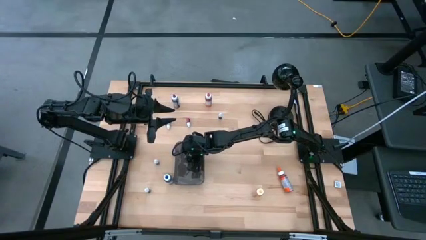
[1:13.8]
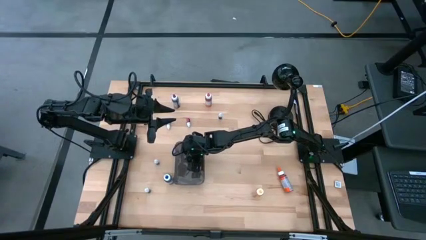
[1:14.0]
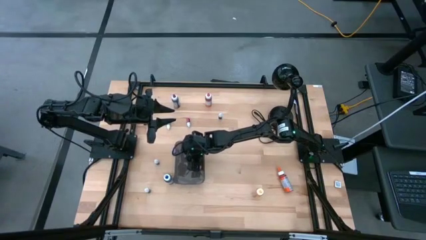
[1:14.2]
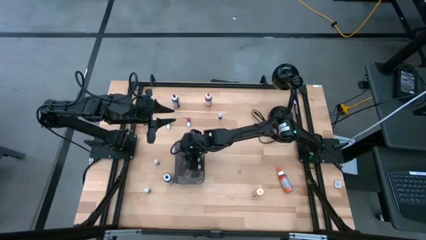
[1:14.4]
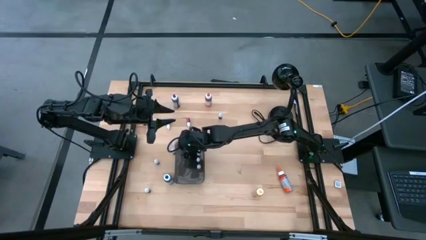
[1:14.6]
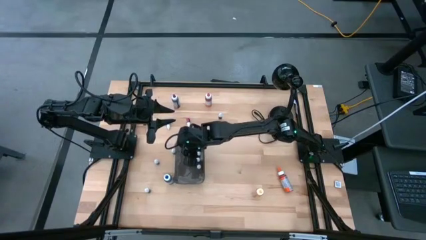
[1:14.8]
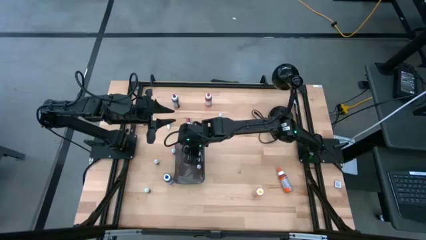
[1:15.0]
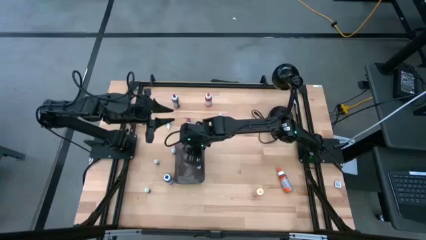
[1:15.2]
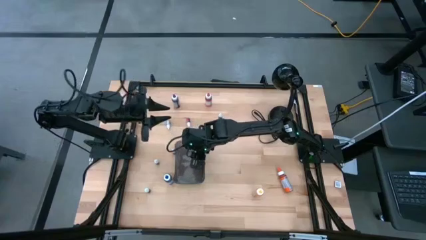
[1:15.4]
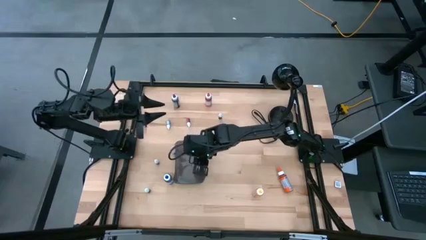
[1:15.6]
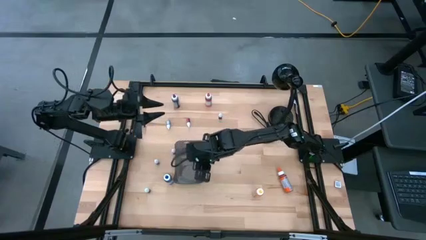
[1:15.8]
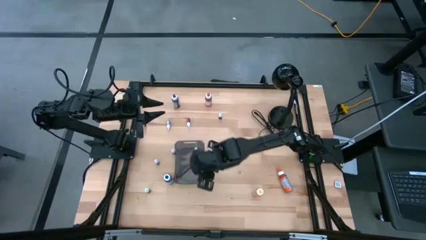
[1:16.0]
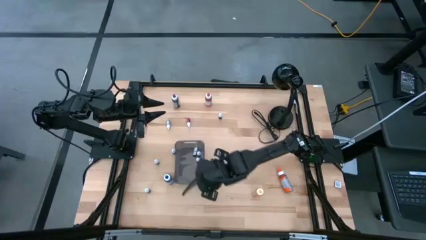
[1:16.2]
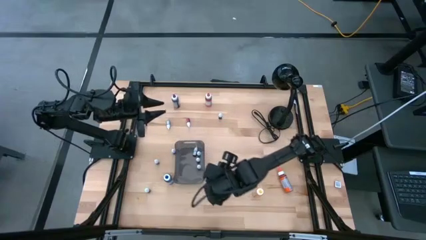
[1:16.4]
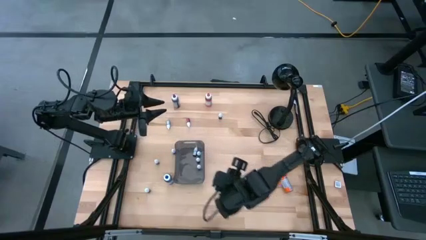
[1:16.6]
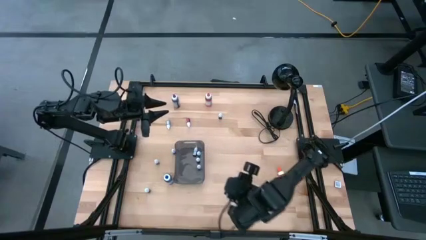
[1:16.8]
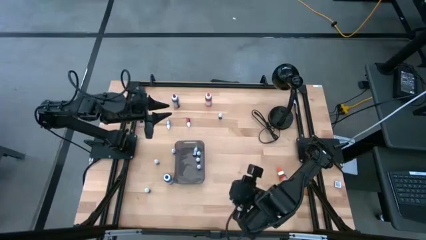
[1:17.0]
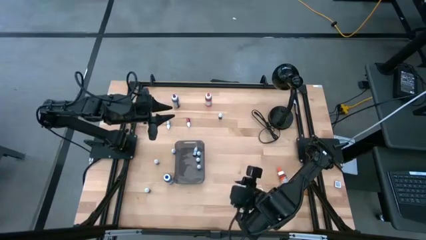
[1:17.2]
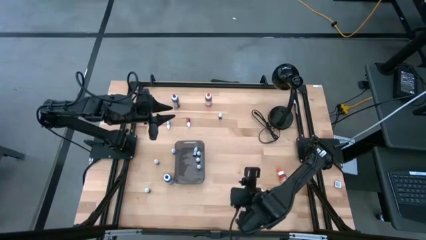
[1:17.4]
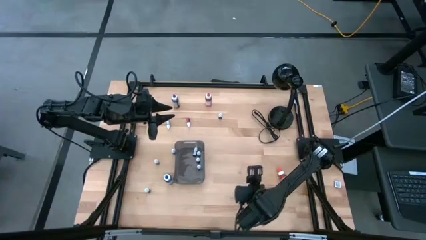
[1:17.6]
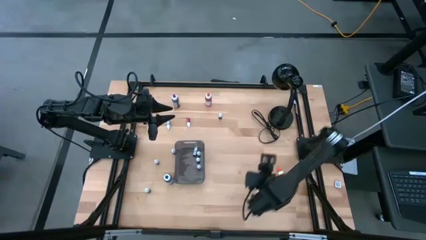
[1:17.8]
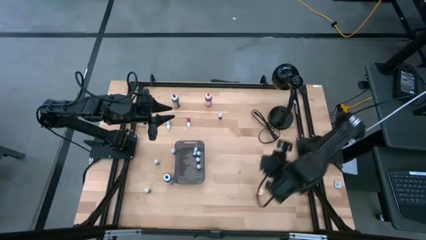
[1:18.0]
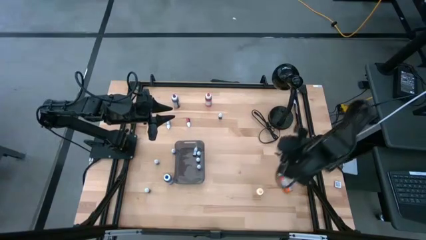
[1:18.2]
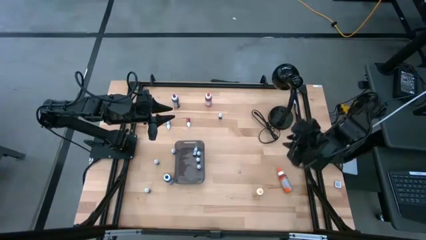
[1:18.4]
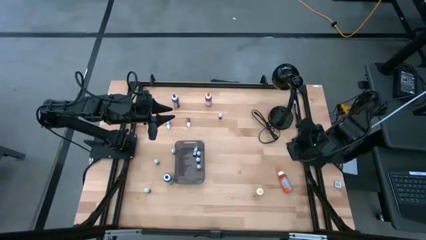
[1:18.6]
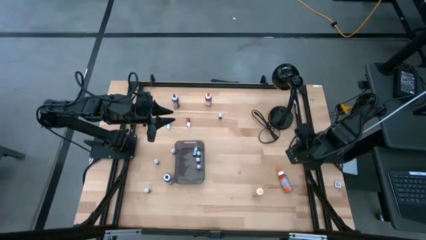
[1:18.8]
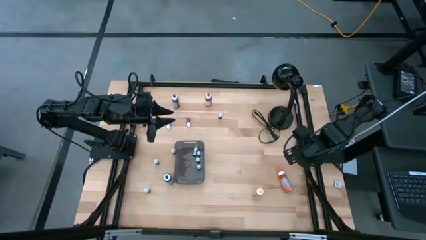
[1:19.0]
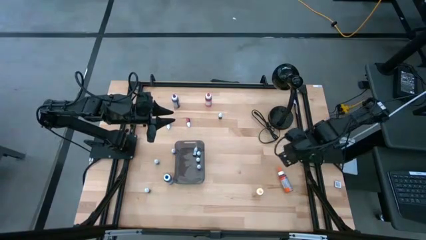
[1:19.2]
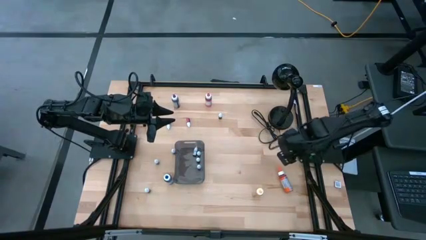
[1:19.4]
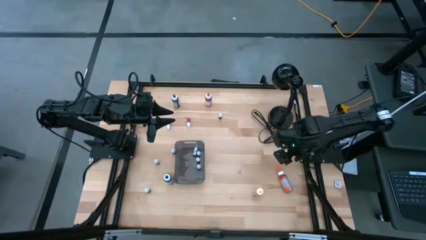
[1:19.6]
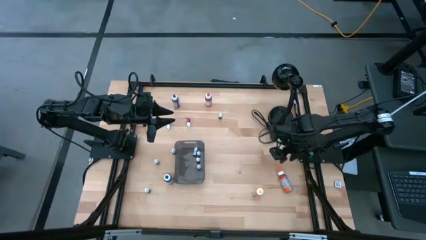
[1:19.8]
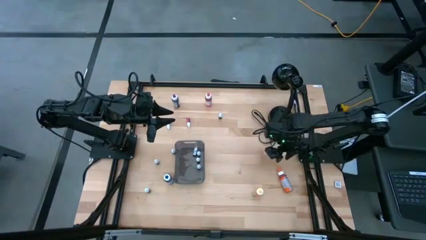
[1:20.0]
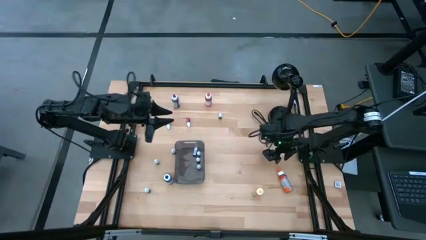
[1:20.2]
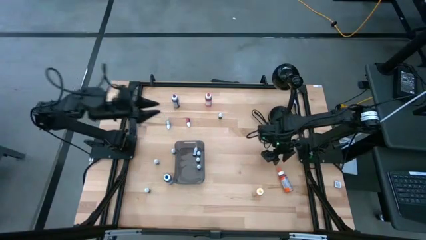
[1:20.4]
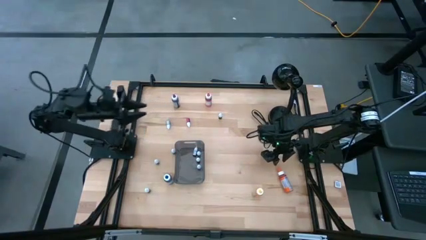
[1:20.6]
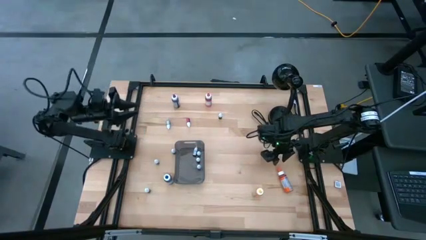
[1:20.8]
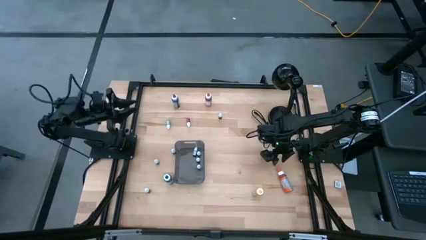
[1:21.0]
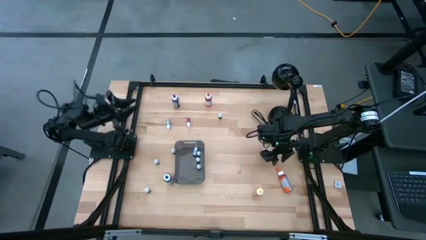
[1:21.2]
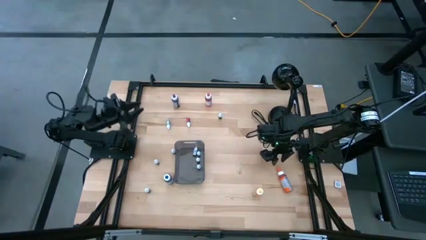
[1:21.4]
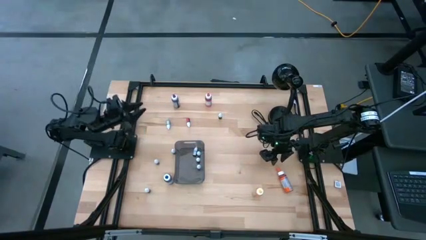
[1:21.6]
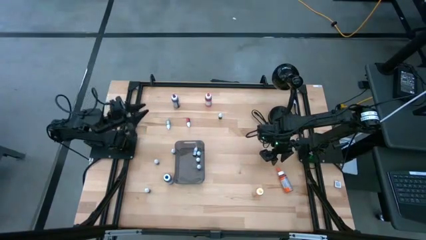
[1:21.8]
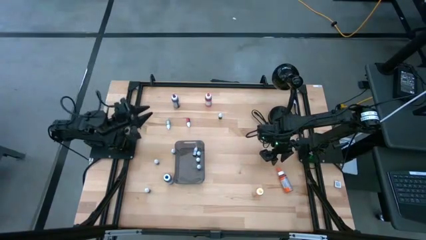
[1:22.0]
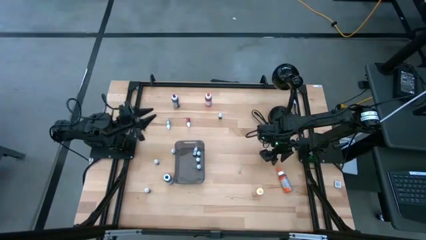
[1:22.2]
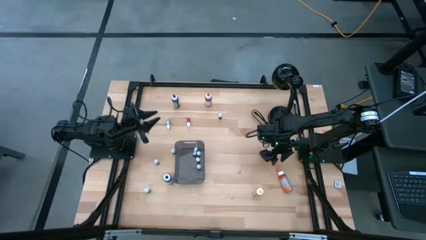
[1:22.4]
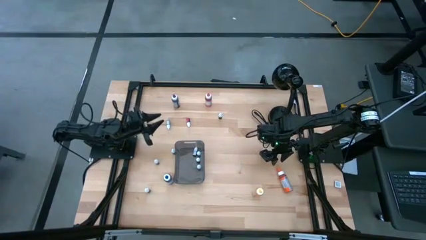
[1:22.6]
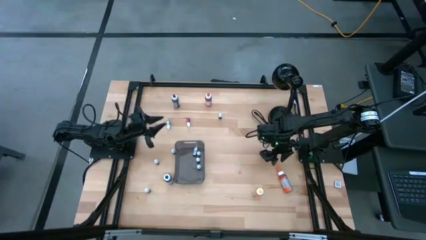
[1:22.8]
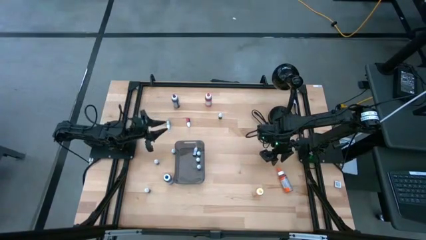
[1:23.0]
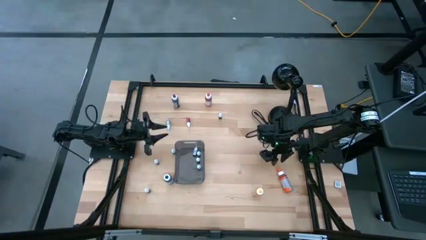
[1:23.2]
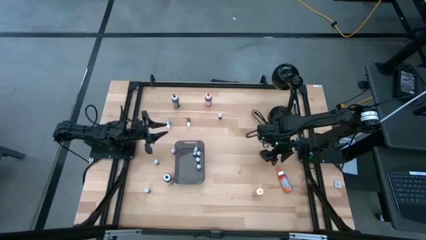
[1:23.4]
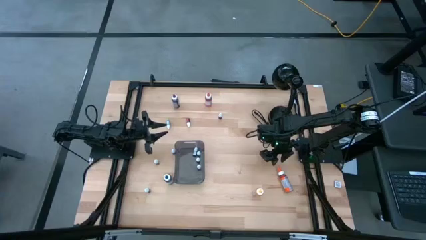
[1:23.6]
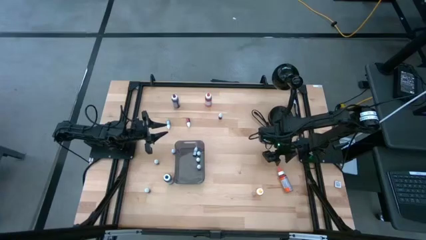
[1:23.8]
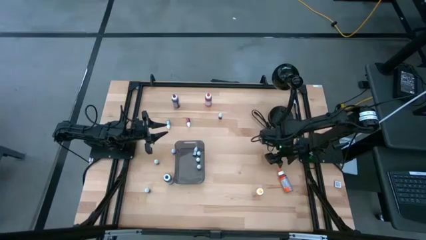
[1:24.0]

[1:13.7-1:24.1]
Task: Pick & Place food coloring
Put the orange food coloring bottle into the bin
